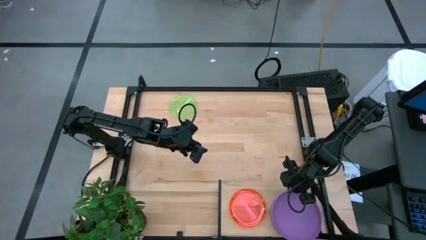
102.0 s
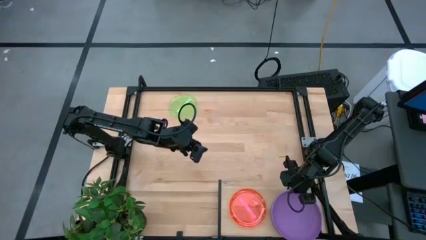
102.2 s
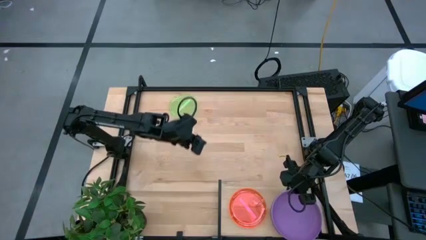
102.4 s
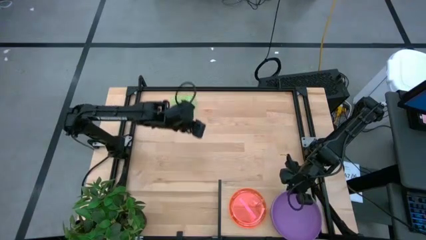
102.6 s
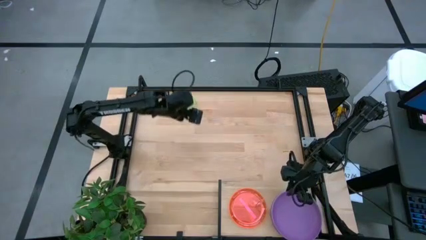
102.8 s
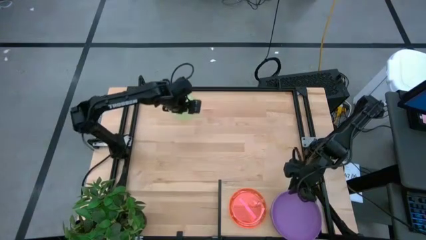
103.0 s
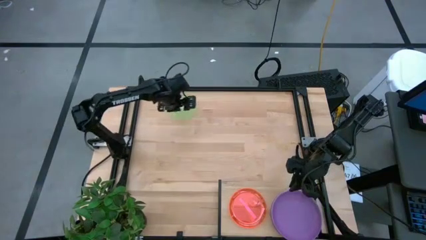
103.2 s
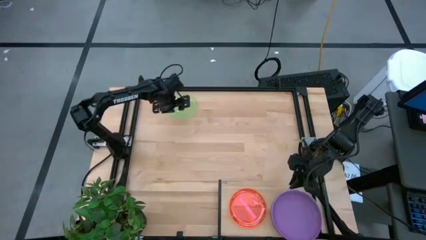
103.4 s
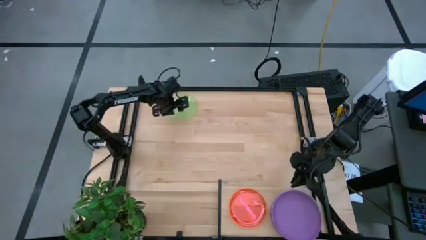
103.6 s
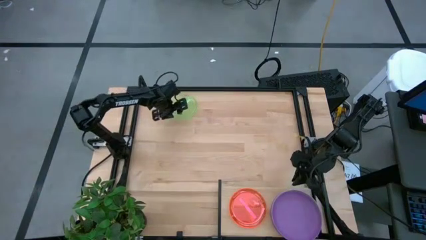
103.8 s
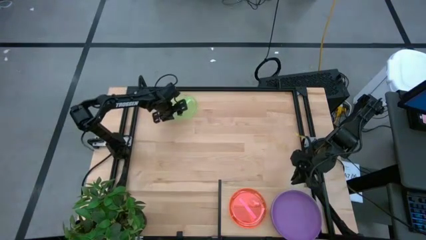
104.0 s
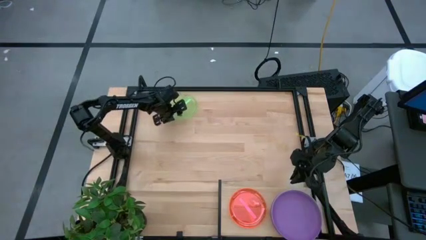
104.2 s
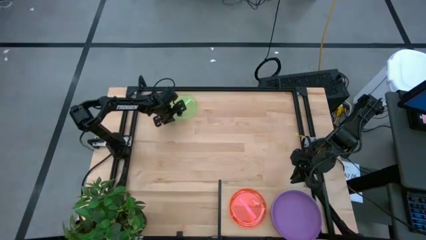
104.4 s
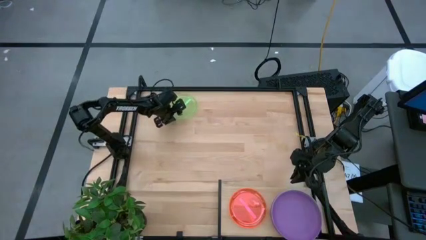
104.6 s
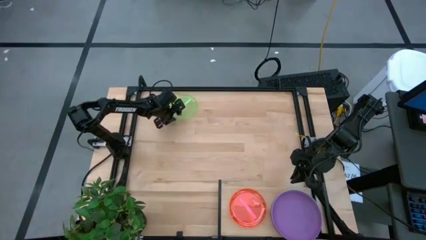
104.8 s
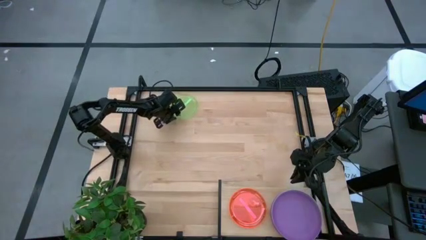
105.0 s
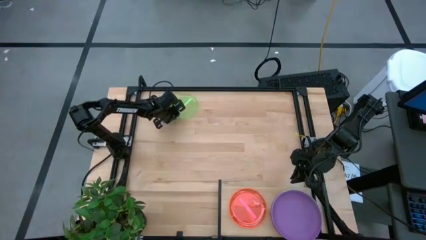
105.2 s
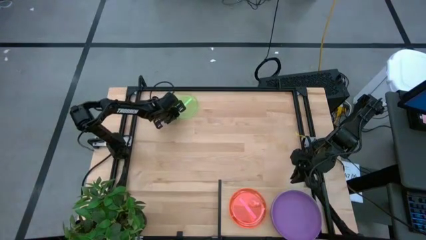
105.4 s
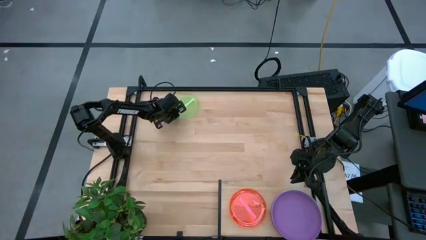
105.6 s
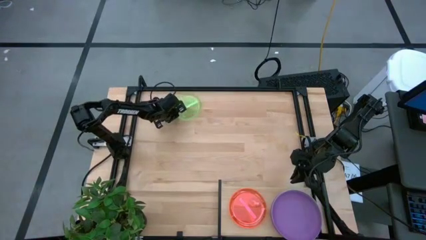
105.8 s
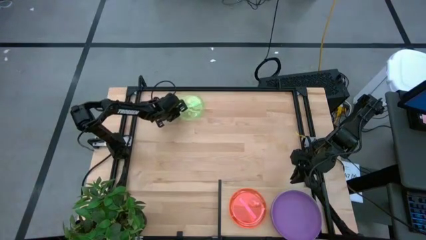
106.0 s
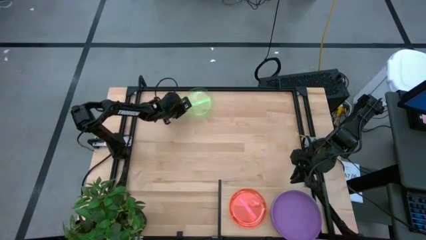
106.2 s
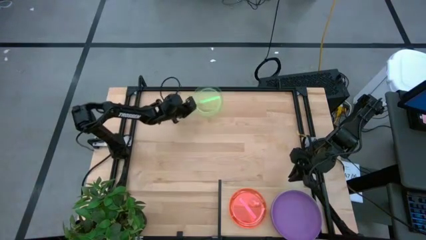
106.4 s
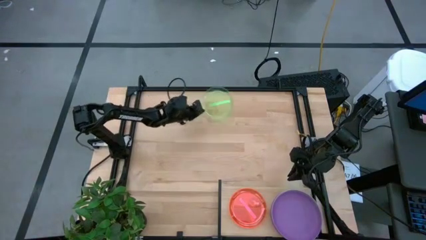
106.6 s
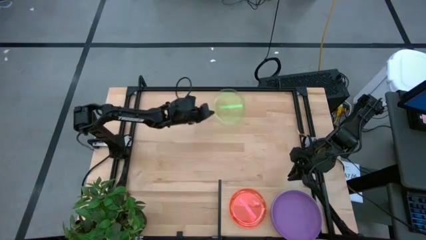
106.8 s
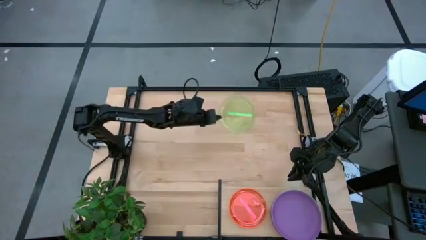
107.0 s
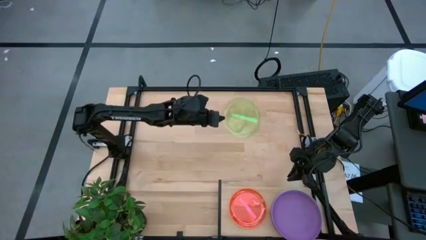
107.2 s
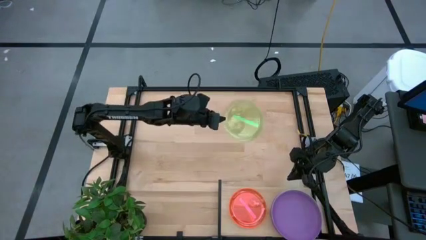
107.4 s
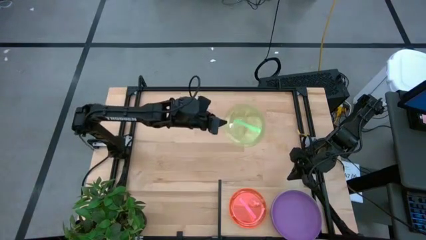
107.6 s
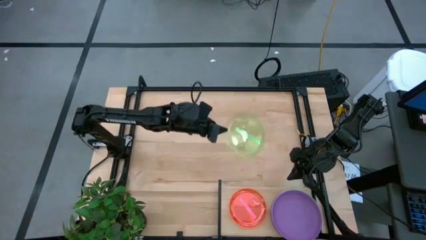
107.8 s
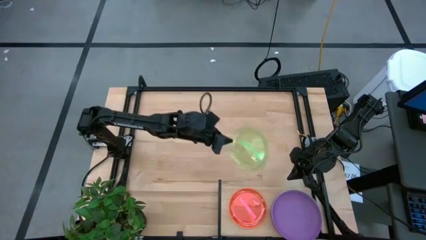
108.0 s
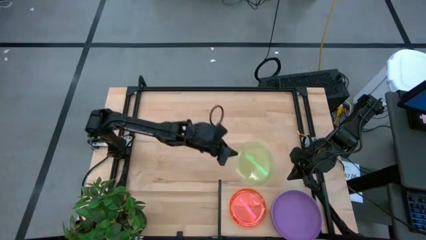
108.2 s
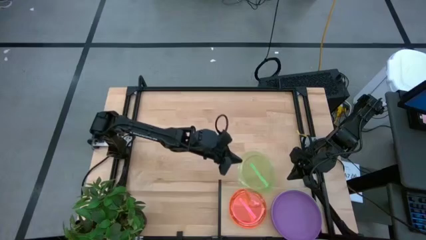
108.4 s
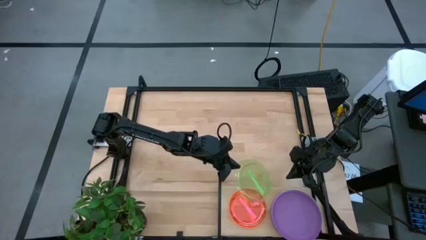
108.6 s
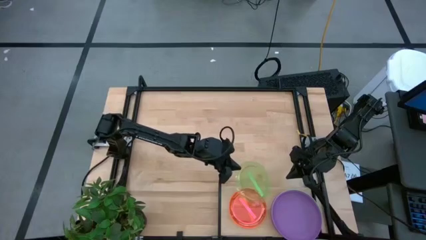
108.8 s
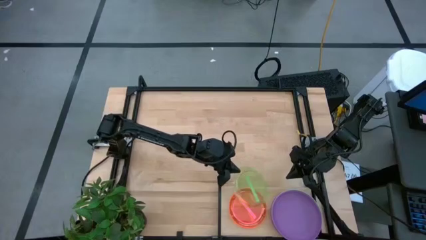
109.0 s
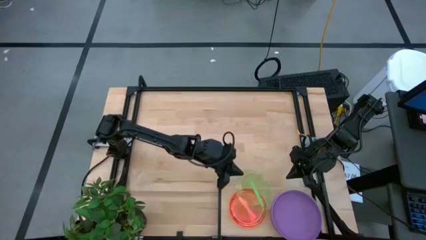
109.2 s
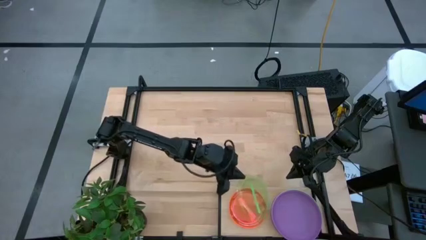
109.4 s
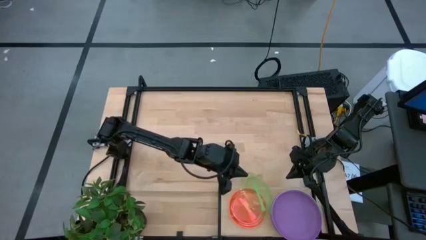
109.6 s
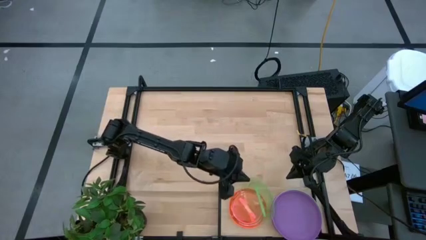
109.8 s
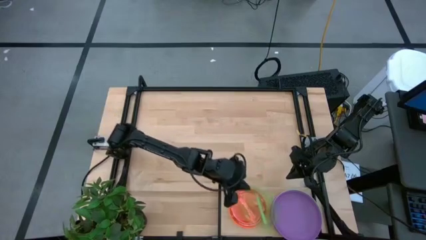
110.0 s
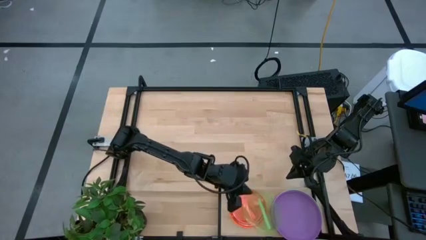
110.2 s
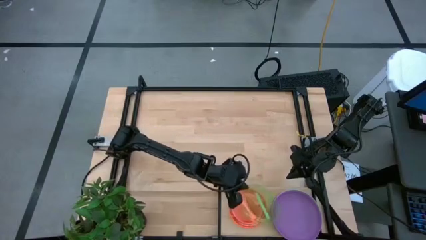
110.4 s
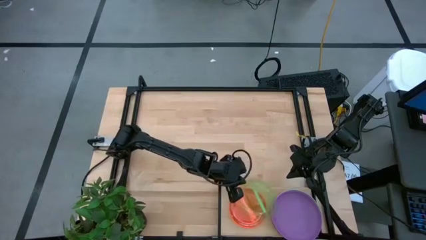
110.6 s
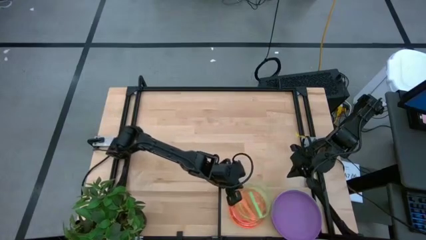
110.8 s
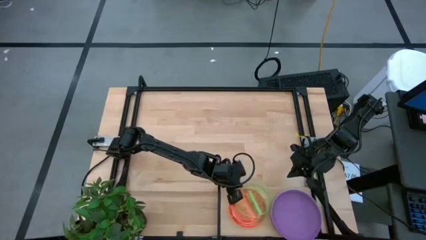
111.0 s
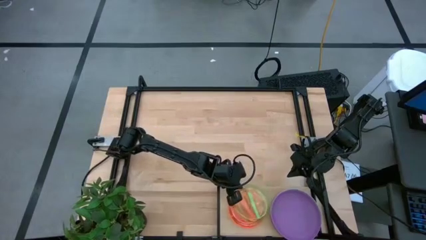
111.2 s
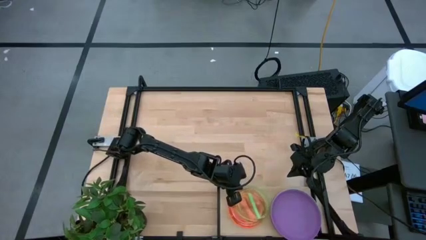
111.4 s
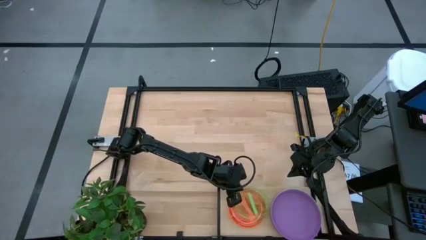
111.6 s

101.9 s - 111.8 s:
Task: Place and stack plates onto a shelf
Stack the green plate on top of the red plate on the shelf

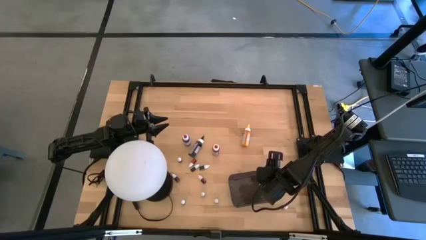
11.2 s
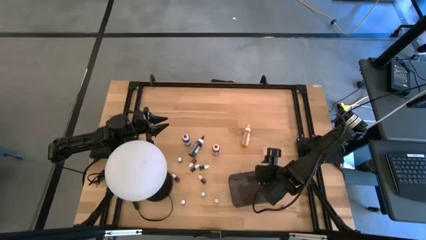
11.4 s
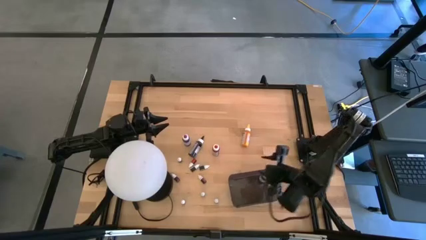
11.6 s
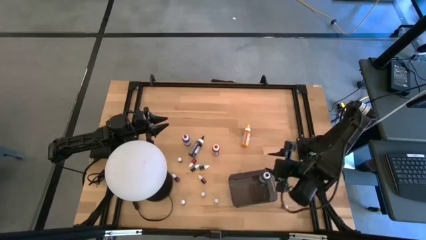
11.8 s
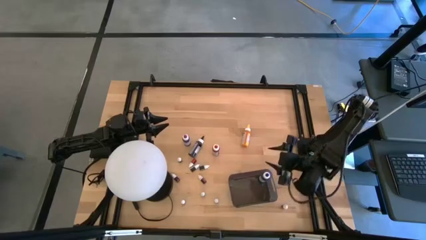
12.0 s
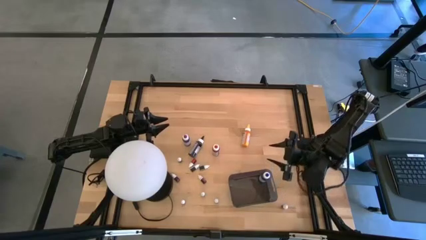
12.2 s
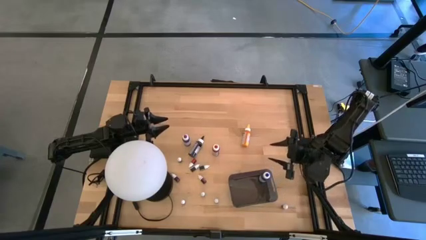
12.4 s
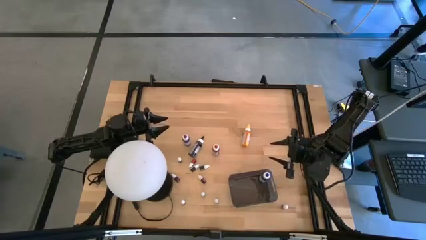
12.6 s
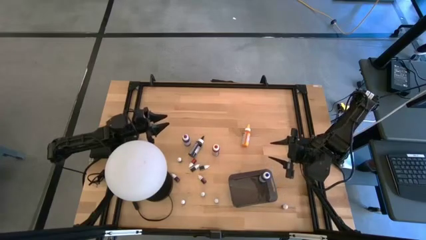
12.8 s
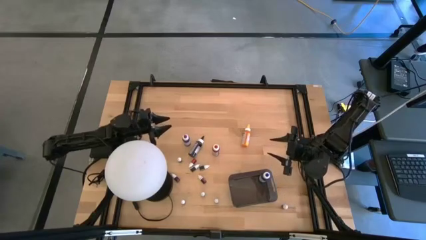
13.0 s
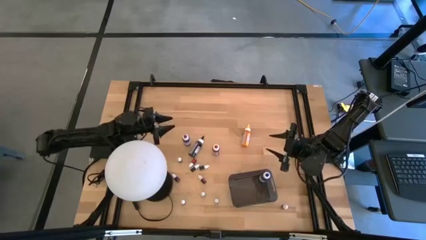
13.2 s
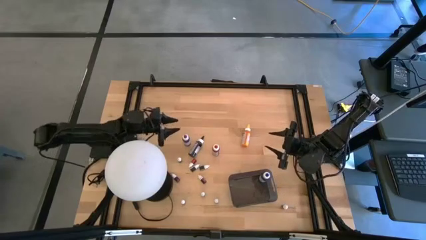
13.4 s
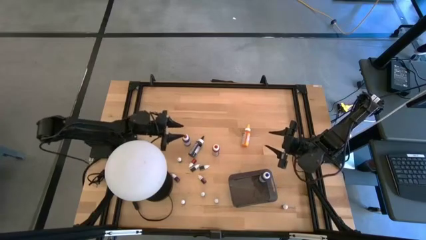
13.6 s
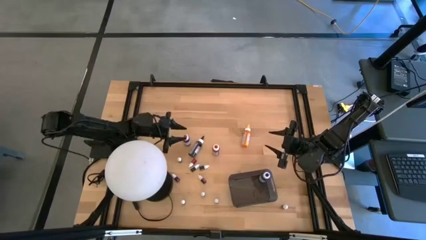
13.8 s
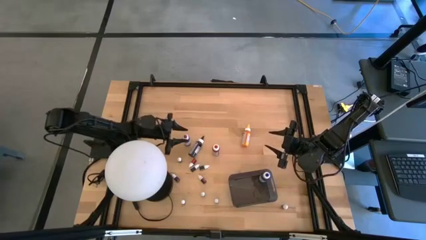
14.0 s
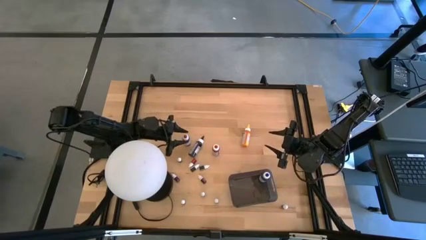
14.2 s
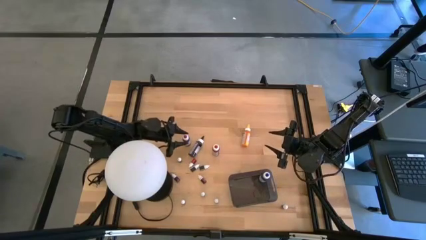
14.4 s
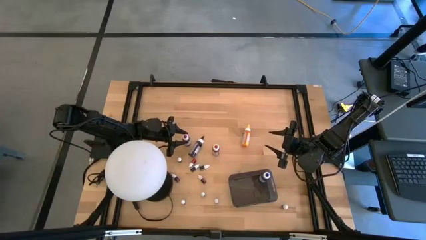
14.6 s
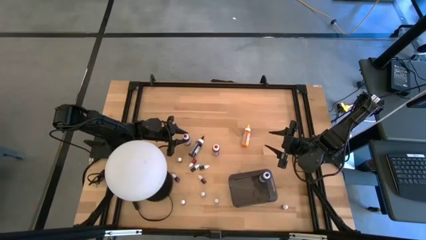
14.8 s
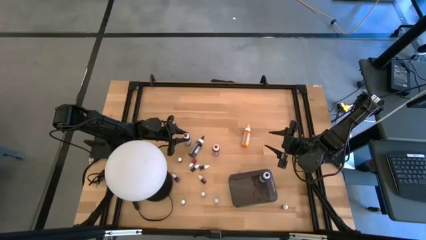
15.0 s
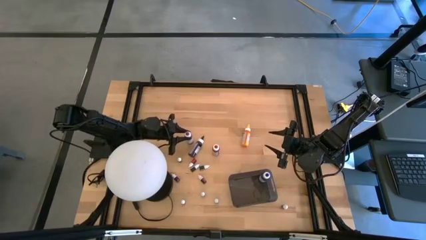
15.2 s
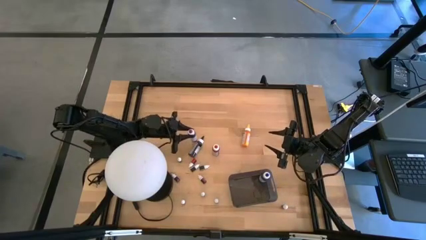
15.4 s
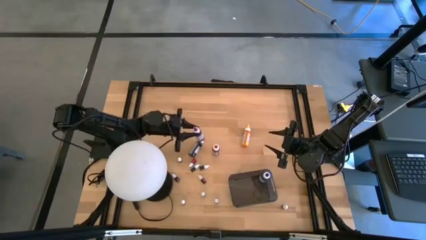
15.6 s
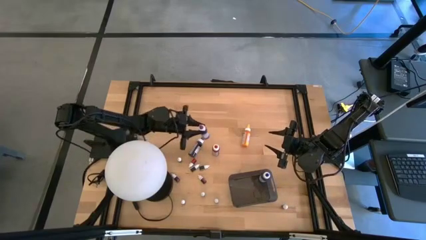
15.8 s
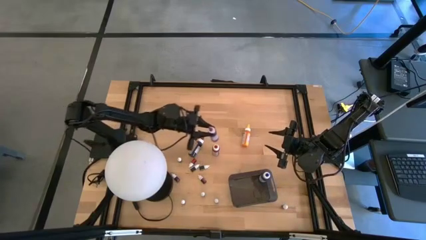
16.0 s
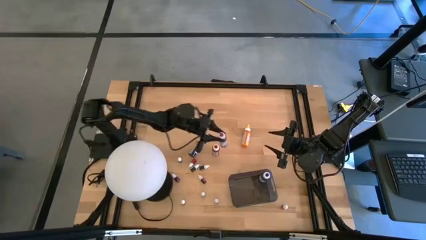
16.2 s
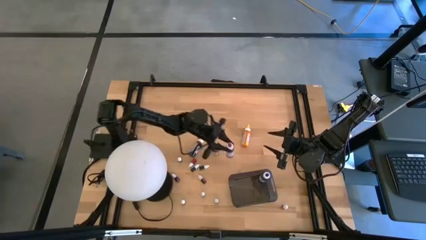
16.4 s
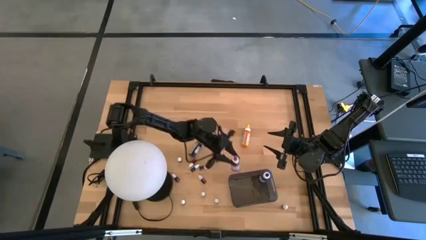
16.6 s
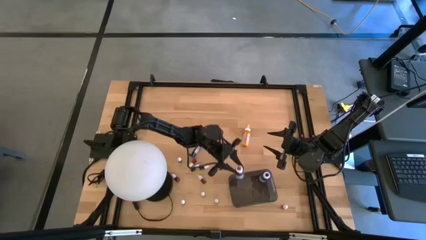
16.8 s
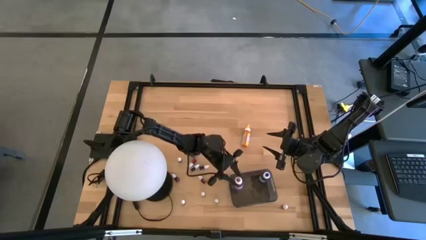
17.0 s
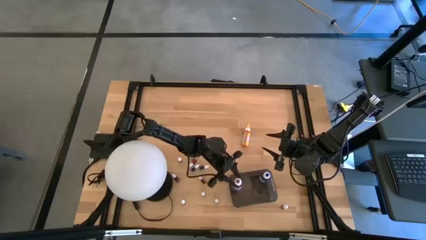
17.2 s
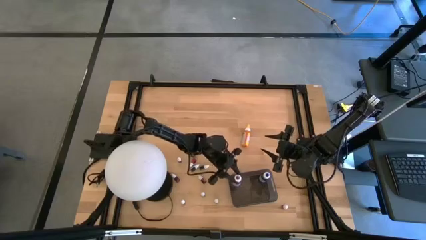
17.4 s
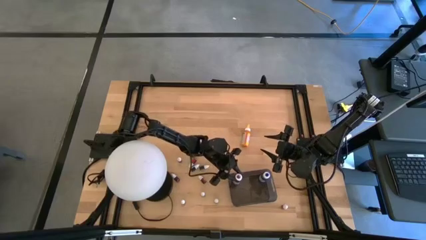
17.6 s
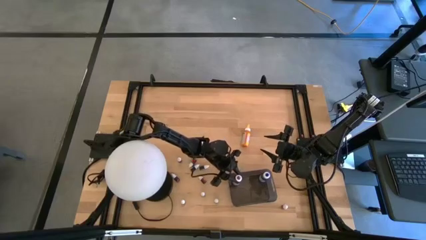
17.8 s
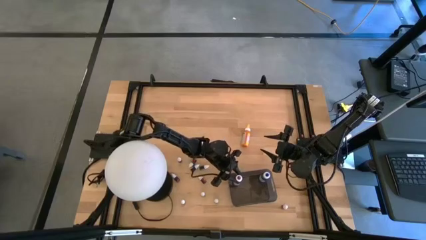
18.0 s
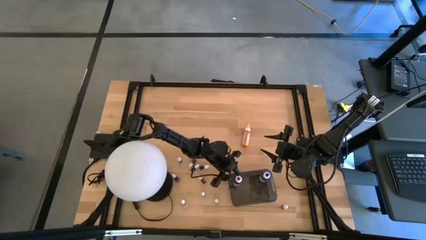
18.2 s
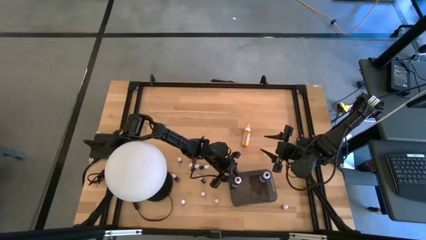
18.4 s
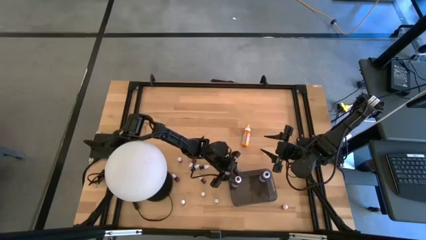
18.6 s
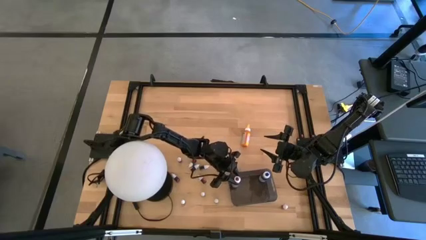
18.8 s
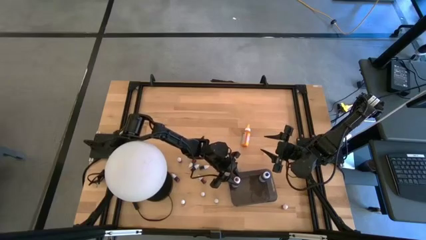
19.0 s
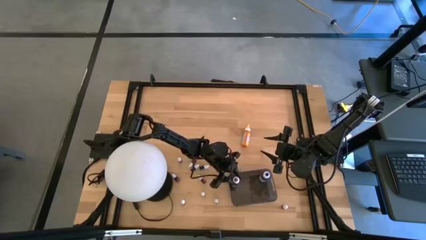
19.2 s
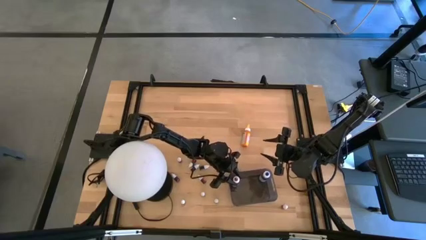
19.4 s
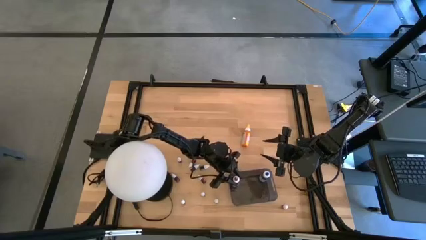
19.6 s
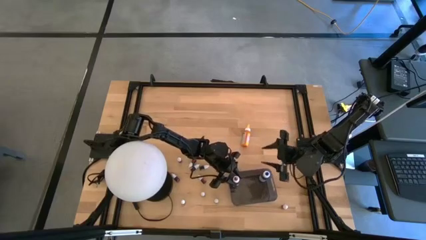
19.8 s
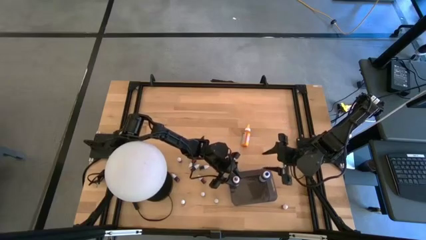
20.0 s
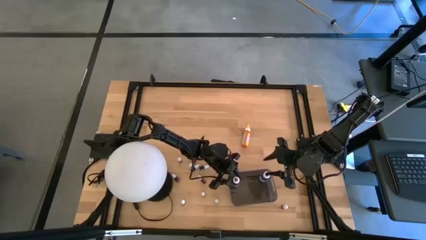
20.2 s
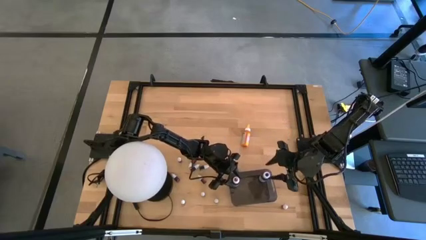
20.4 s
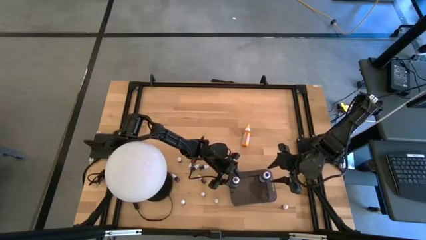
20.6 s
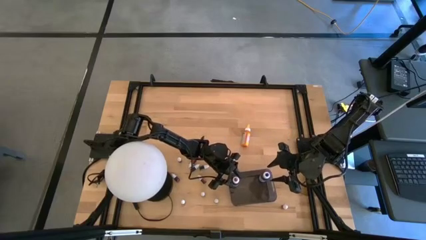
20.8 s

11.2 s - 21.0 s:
Task: Pick & Place food coloring
Put the large purple food coloring bottle into the bin
